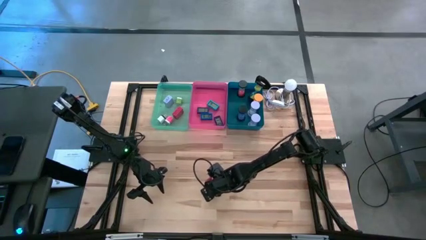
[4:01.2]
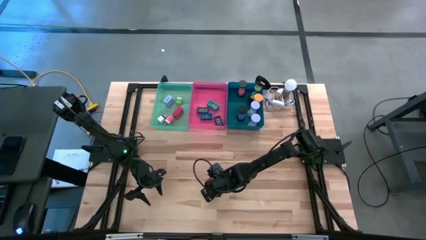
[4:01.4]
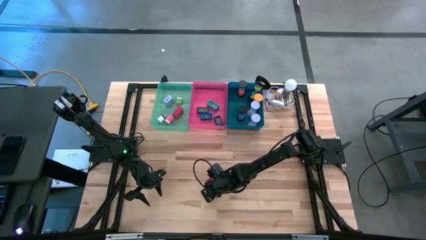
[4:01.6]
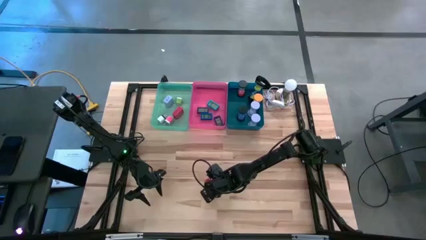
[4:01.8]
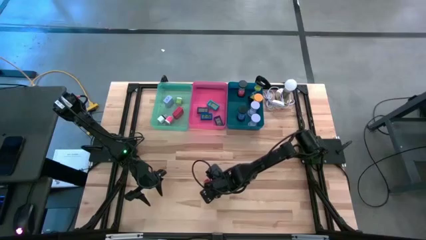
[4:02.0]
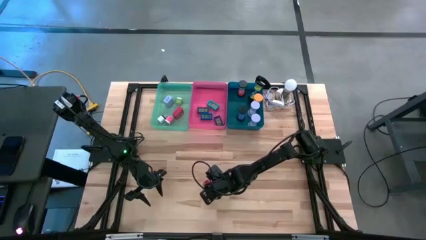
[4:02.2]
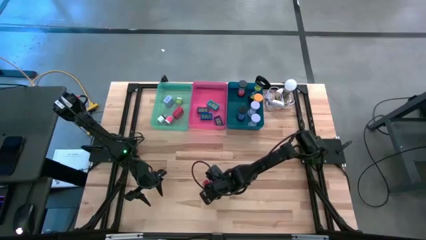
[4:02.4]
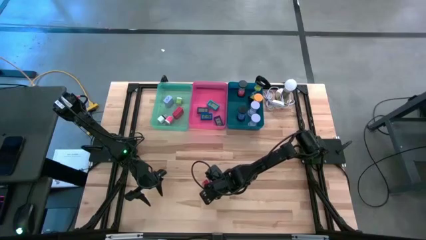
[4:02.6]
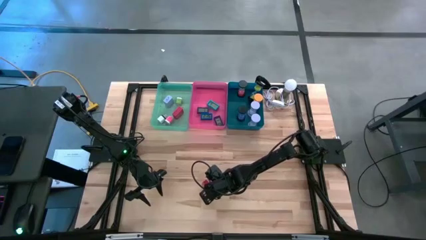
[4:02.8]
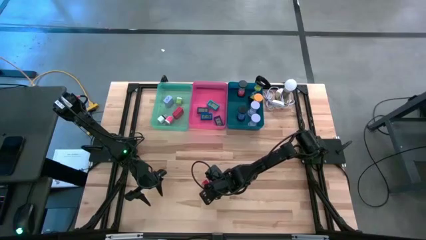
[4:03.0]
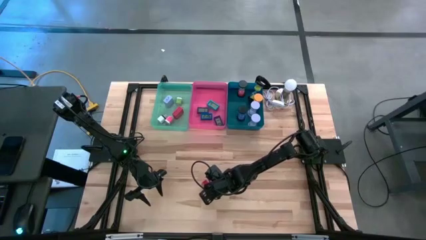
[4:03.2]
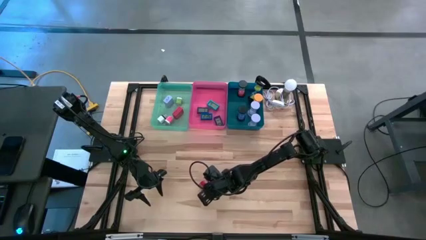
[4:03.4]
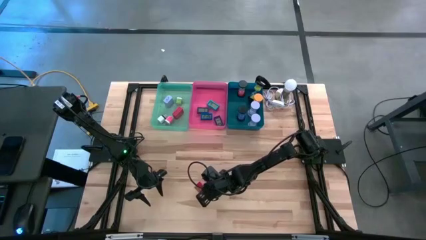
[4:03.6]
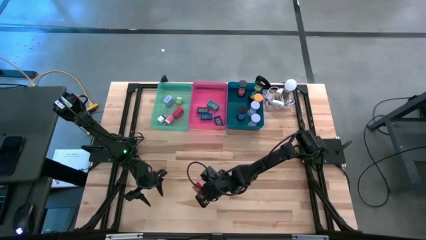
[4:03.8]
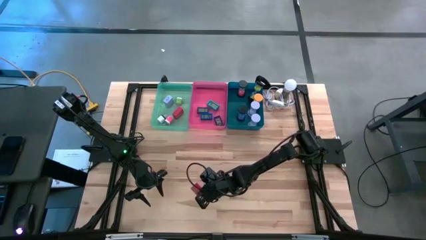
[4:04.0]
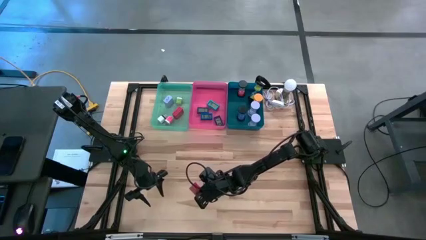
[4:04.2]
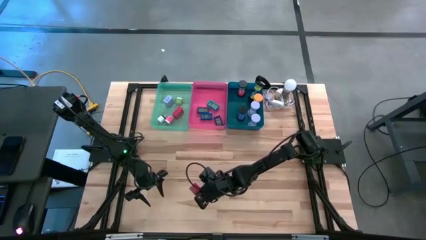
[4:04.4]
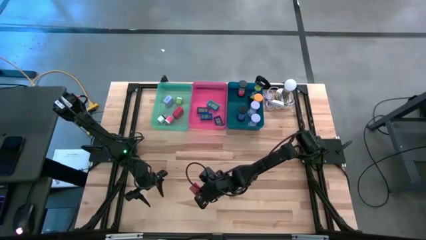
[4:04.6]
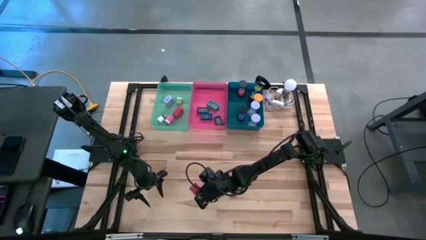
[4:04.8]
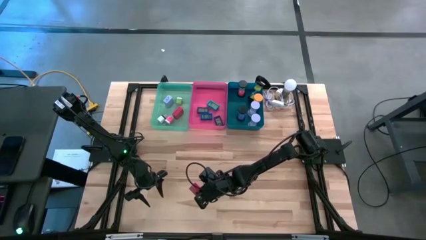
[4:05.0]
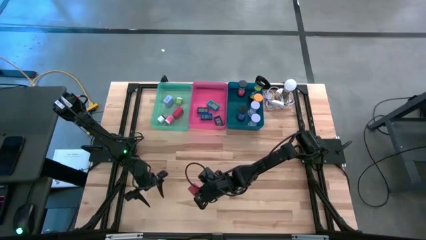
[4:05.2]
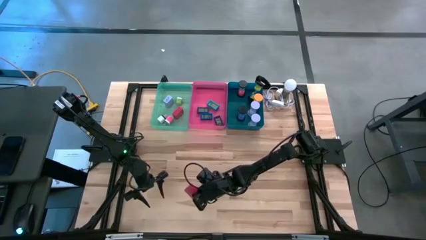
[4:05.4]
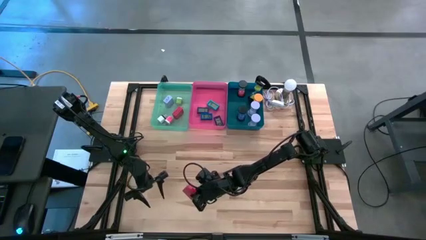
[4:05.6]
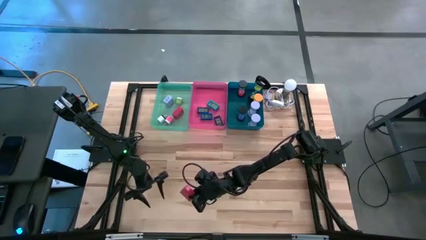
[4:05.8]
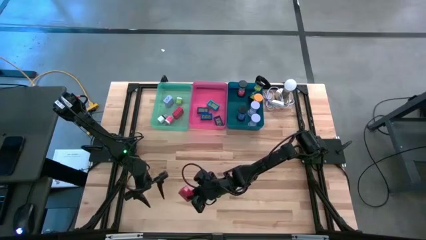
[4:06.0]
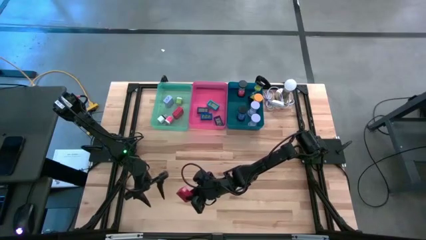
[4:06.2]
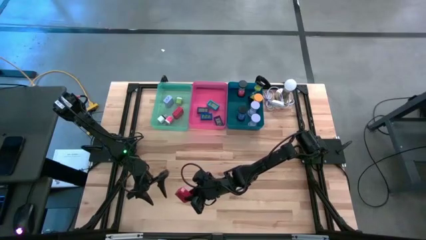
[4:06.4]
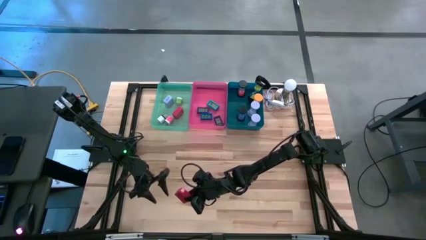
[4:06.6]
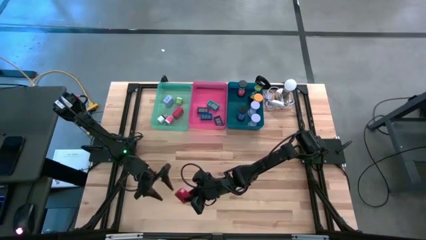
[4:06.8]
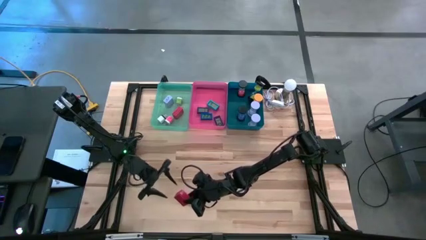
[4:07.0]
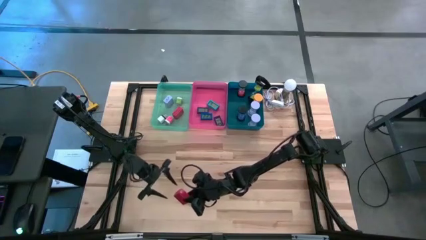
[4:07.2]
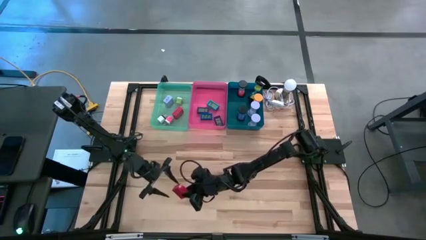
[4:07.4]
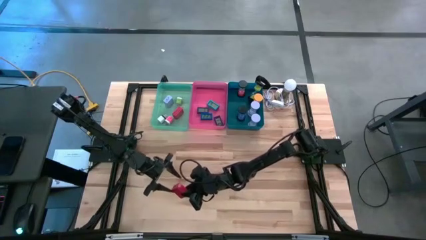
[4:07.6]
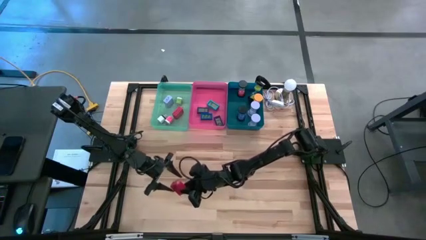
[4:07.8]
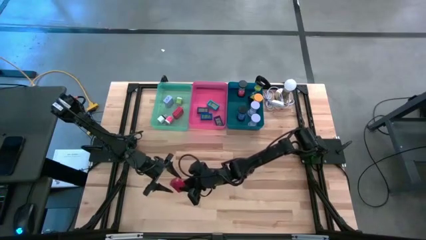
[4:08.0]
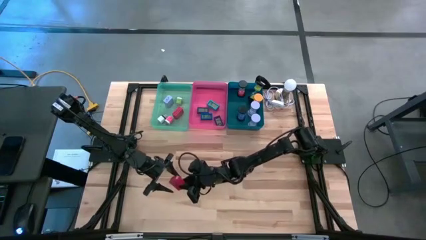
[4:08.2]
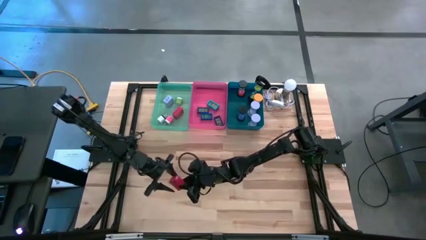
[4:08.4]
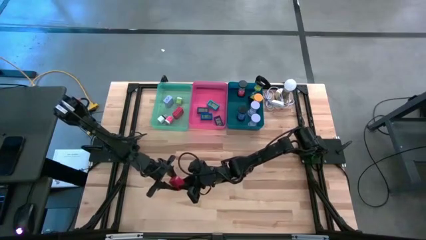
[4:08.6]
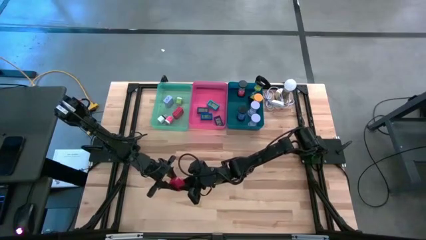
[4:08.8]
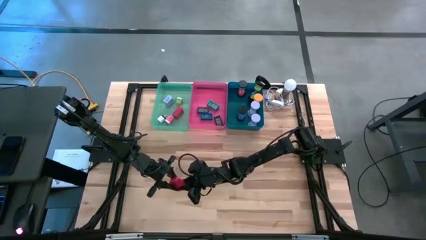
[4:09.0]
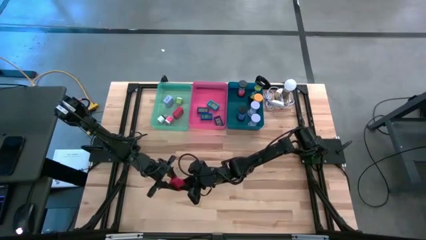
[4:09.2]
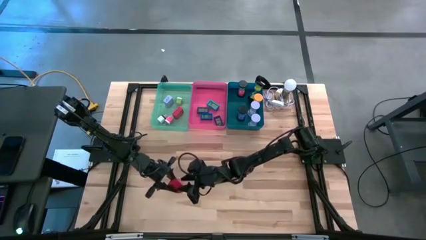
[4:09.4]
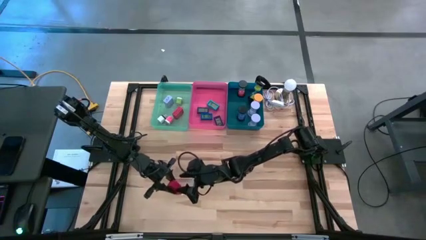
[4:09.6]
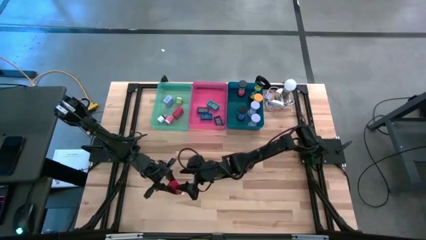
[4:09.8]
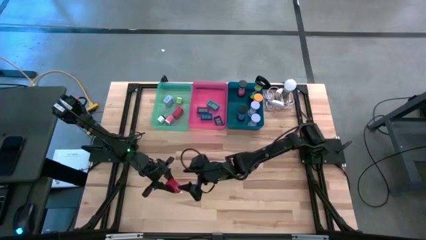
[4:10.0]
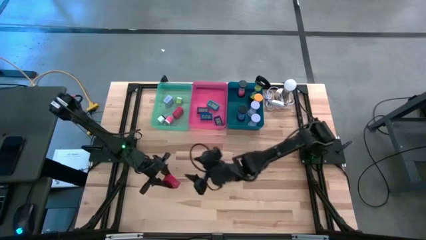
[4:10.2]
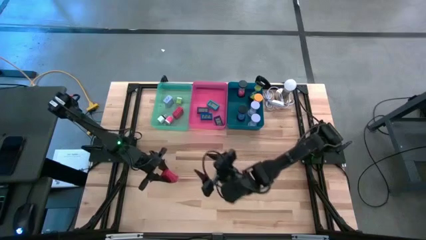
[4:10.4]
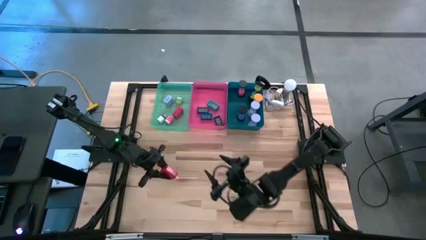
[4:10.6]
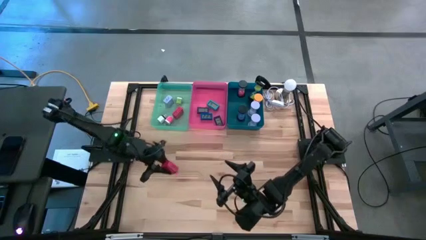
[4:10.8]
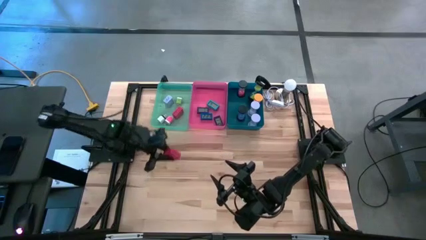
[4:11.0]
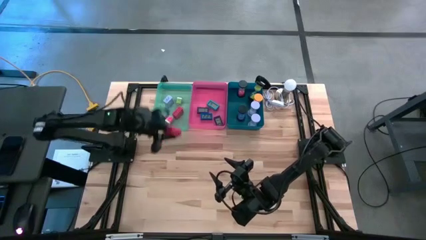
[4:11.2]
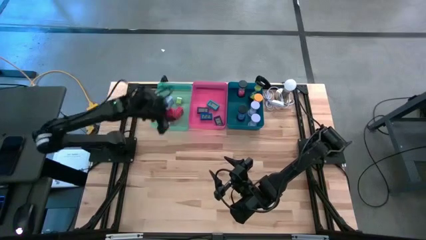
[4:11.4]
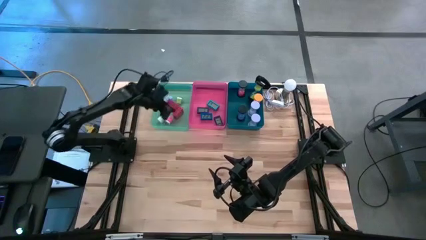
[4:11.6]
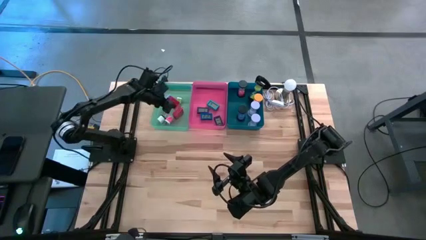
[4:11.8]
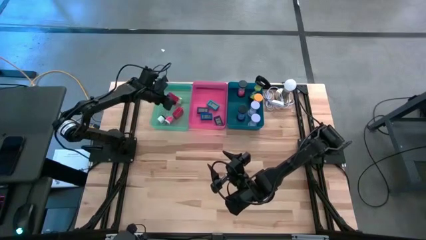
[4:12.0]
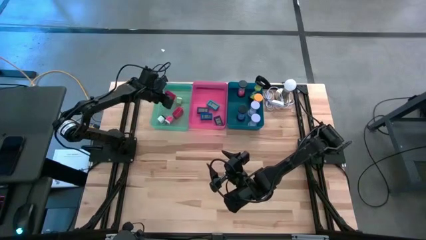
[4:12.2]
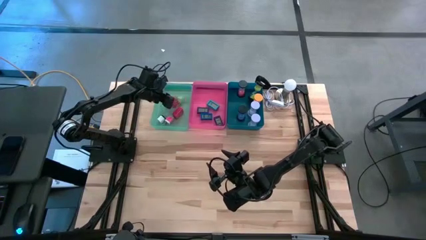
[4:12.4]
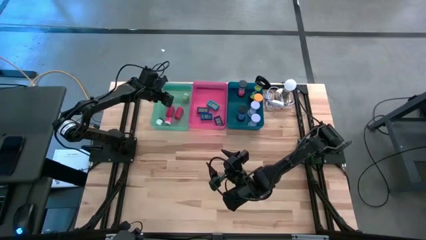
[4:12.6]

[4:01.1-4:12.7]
Task: Pick & Place Office items
Put the red adapter into the green bin

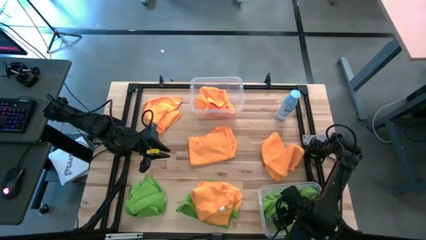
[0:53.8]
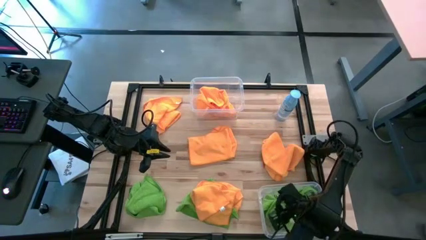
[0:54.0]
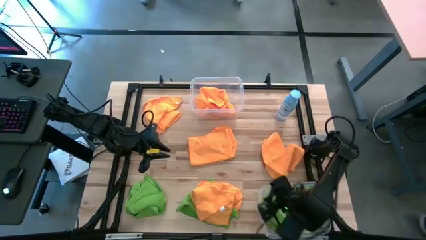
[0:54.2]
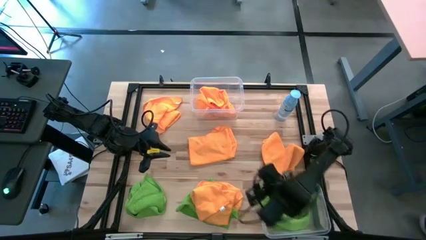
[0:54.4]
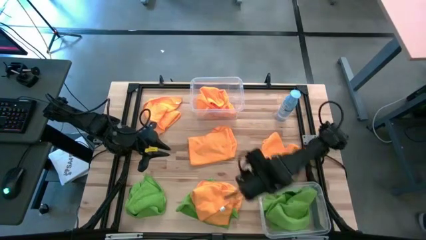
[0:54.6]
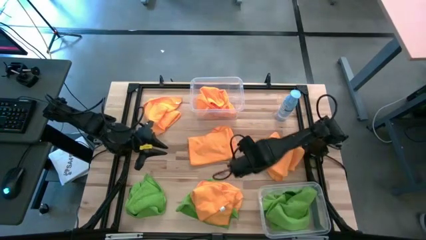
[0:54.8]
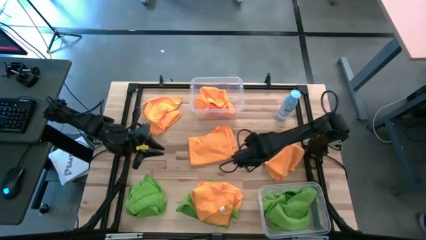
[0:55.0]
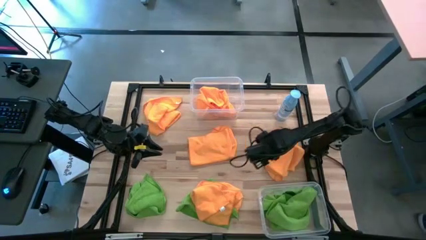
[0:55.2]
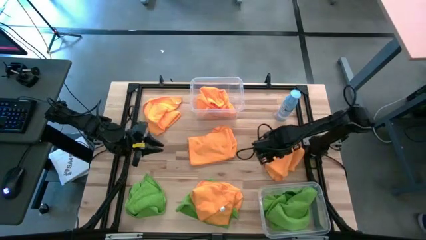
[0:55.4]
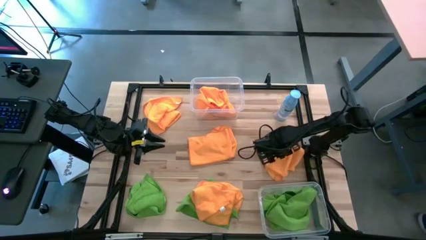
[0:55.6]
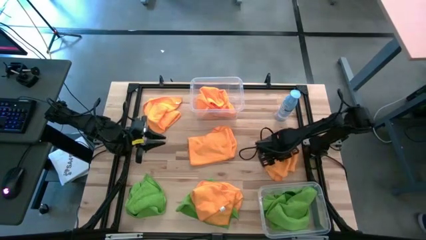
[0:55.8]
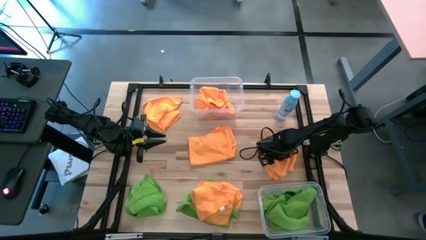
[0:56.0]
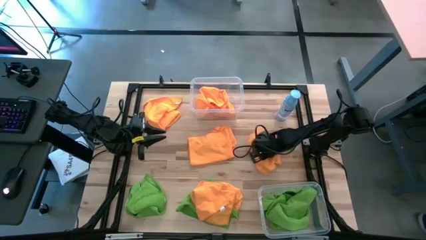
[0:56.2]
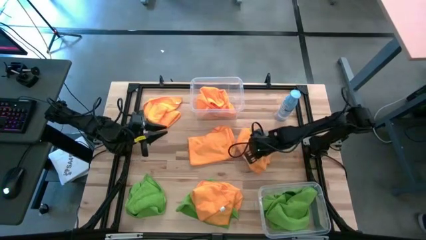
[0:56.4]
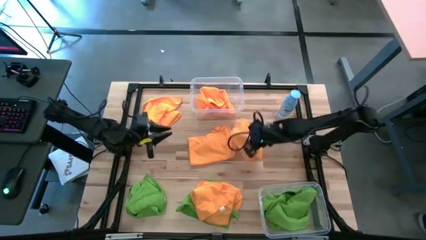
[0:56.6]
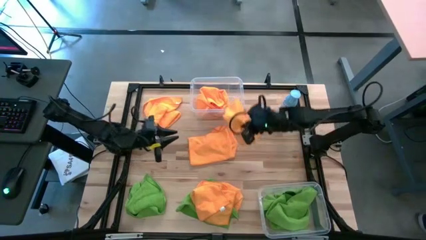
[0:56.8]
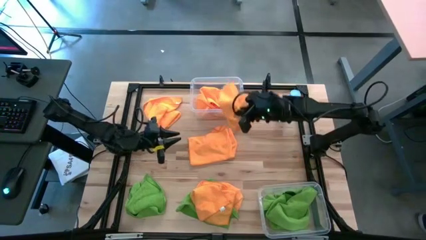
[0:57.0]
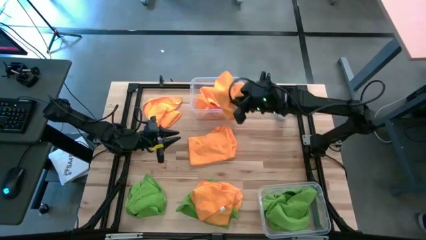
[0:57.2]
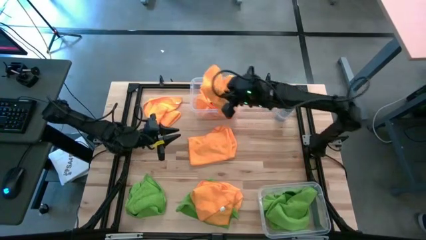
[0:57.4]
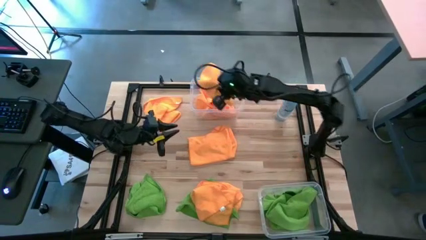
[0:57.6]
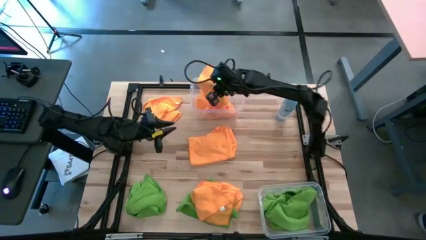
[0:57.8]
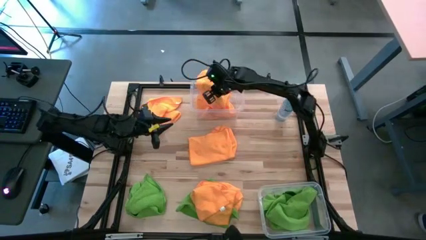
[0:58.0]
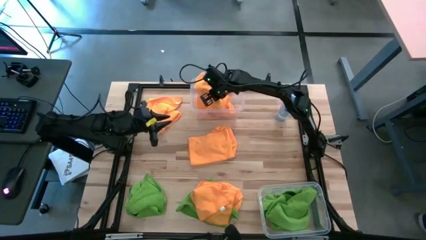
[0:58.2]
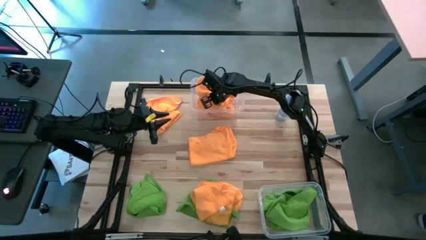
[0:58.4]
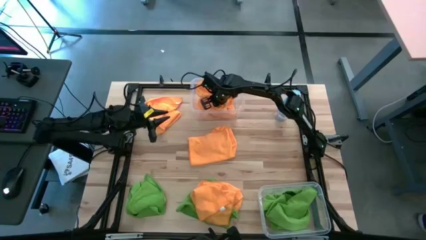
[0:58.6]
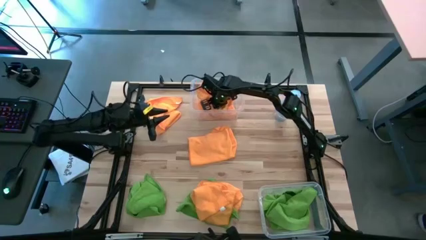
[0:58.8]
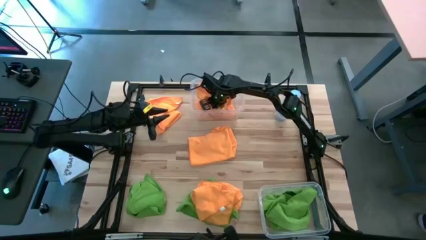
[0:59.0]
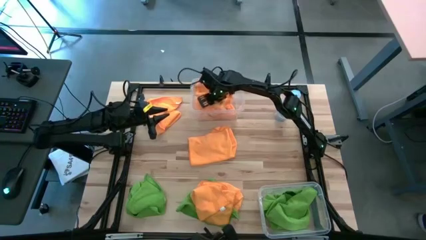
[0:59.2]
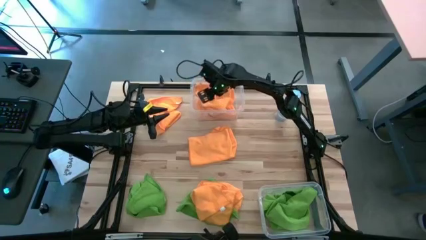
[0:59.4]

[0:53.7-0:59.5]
Task: Sort microfiber towel by color & place in baskets
Put the orange microfiber towel into the top transparent bin
